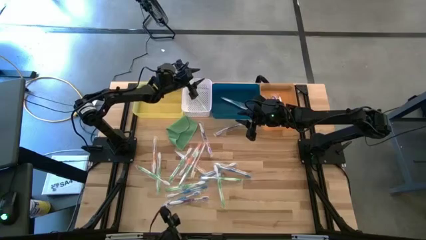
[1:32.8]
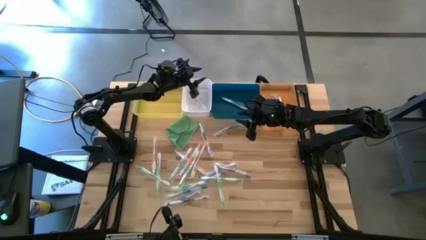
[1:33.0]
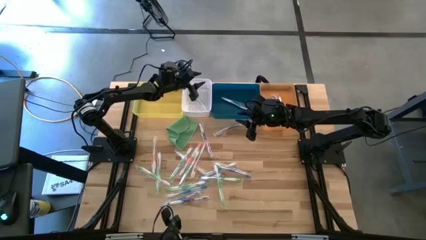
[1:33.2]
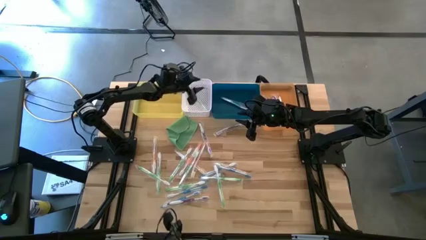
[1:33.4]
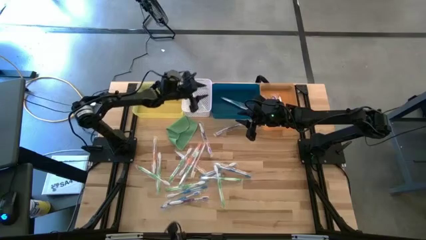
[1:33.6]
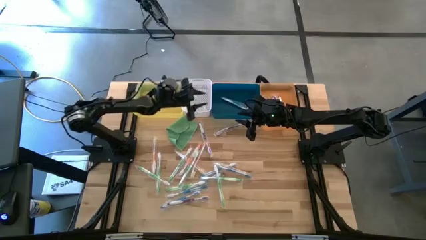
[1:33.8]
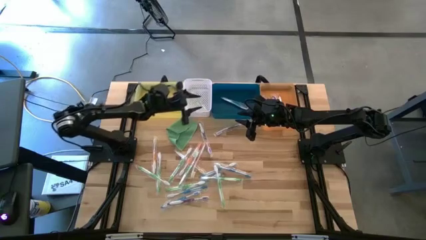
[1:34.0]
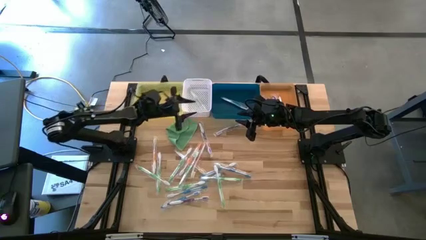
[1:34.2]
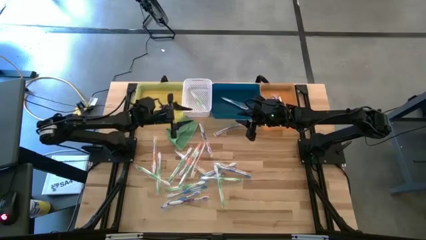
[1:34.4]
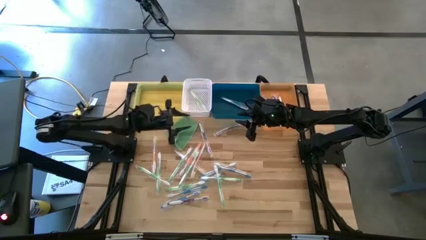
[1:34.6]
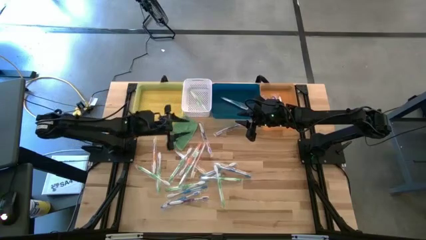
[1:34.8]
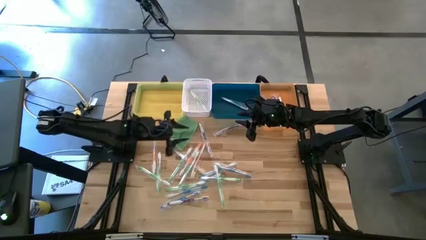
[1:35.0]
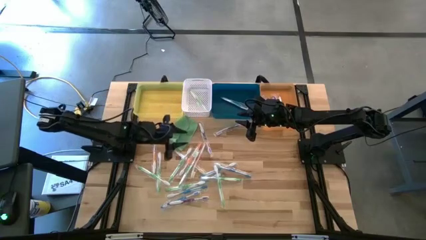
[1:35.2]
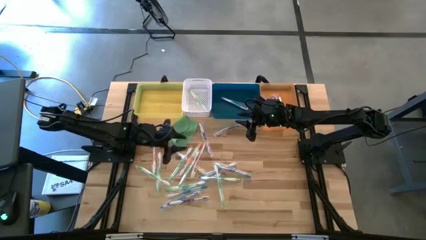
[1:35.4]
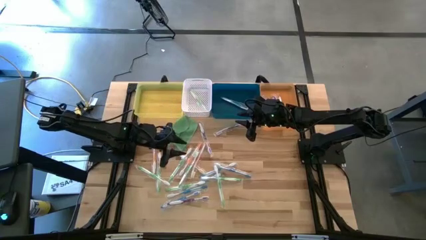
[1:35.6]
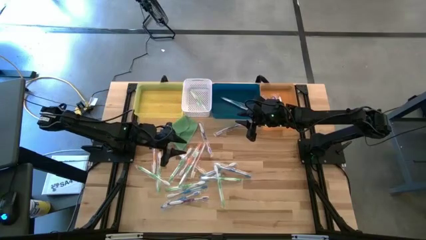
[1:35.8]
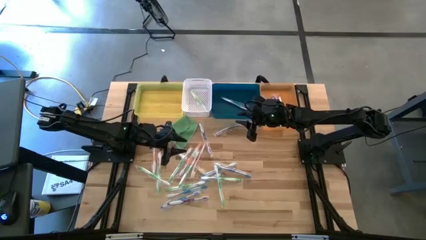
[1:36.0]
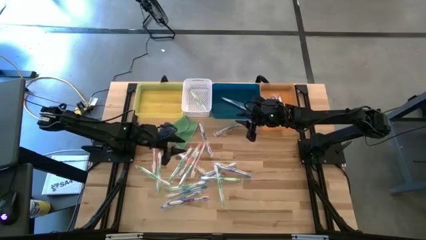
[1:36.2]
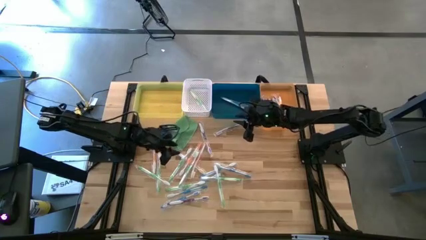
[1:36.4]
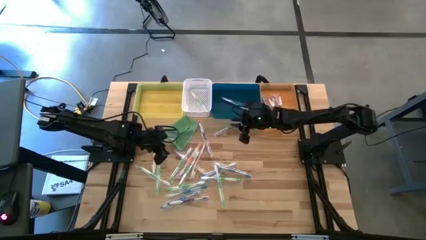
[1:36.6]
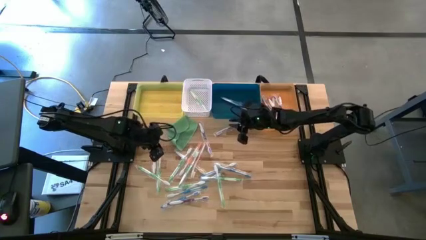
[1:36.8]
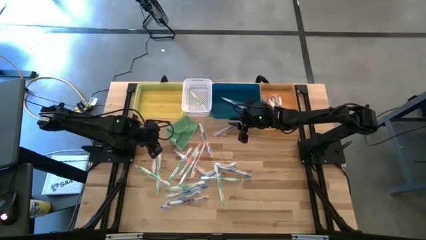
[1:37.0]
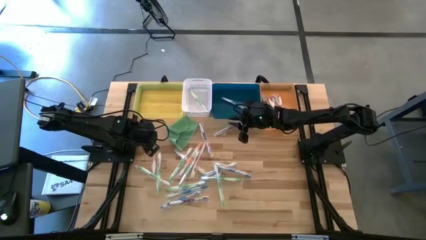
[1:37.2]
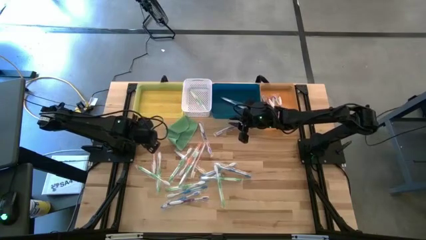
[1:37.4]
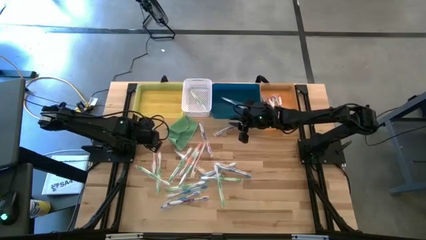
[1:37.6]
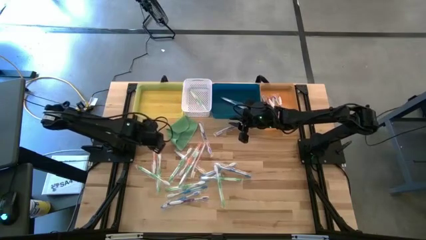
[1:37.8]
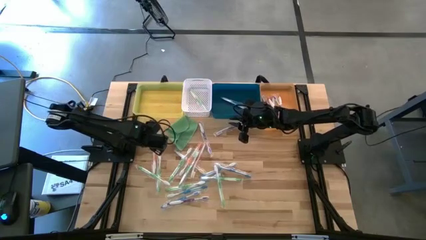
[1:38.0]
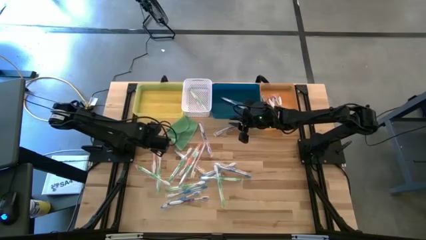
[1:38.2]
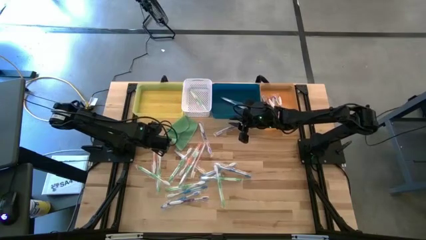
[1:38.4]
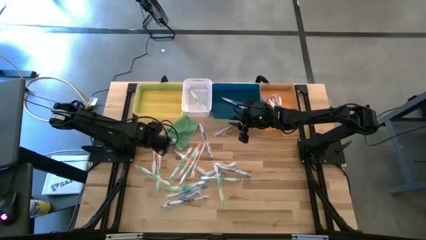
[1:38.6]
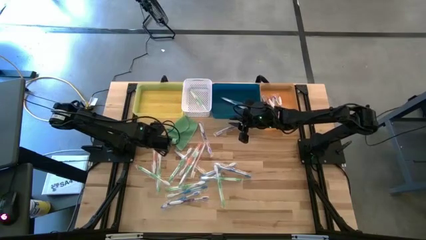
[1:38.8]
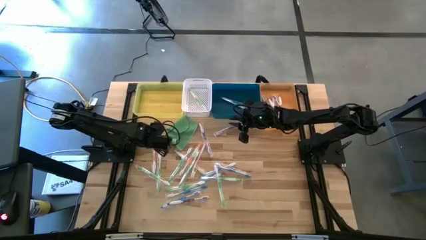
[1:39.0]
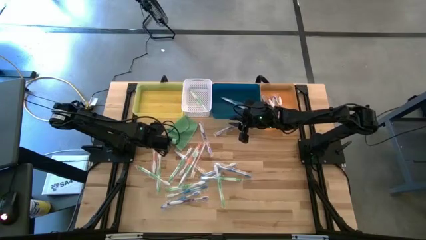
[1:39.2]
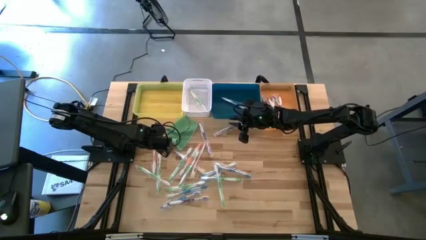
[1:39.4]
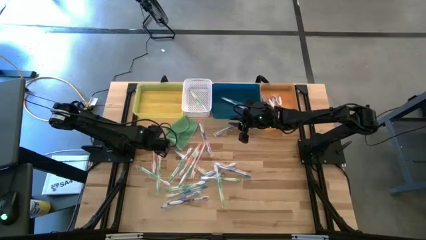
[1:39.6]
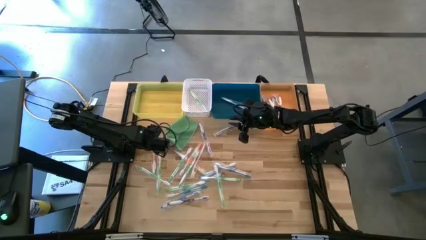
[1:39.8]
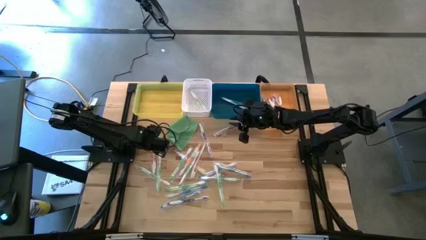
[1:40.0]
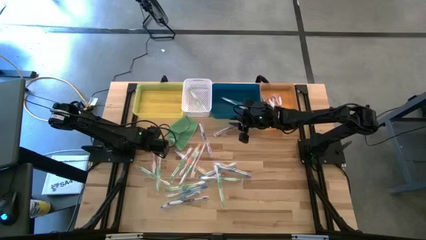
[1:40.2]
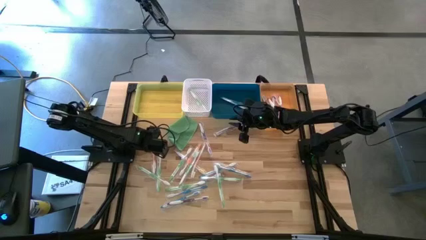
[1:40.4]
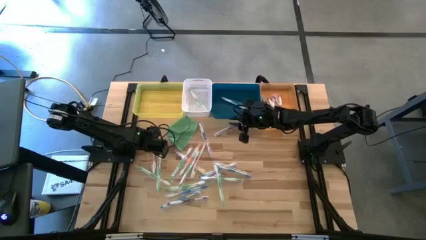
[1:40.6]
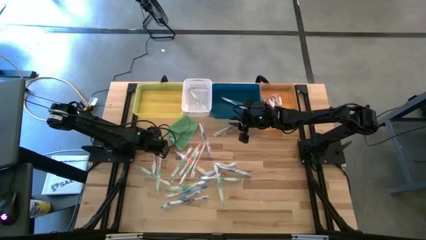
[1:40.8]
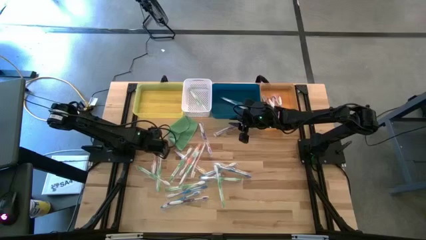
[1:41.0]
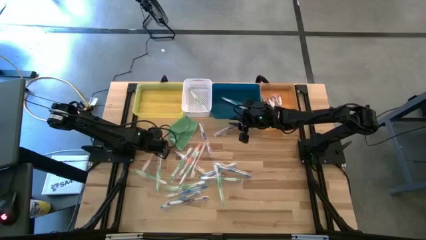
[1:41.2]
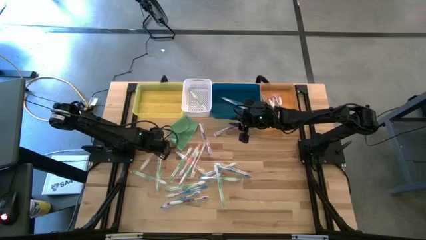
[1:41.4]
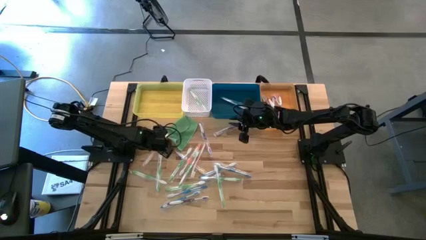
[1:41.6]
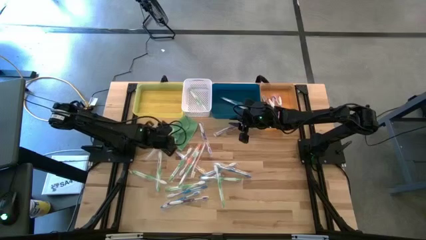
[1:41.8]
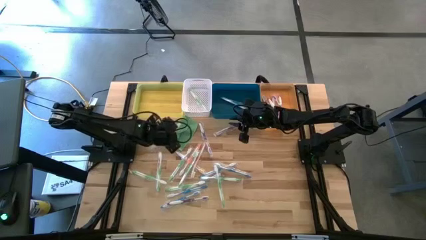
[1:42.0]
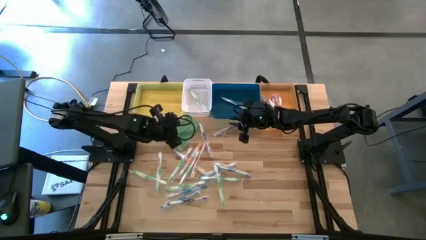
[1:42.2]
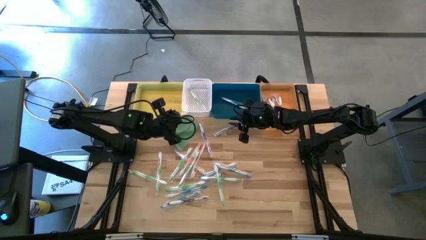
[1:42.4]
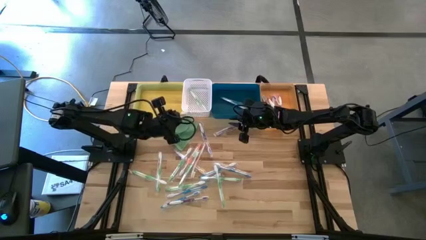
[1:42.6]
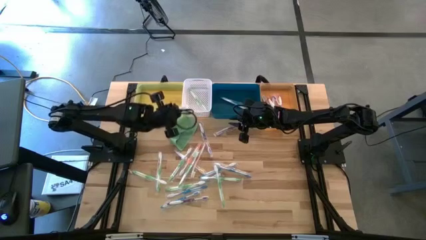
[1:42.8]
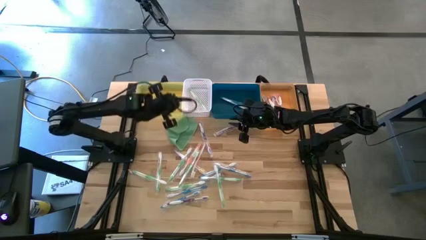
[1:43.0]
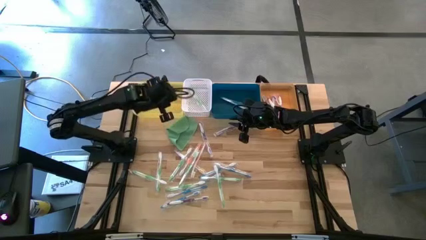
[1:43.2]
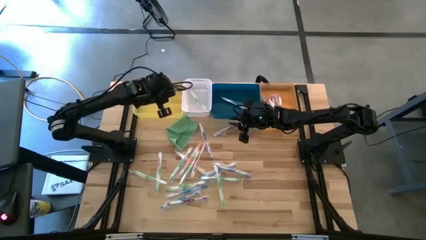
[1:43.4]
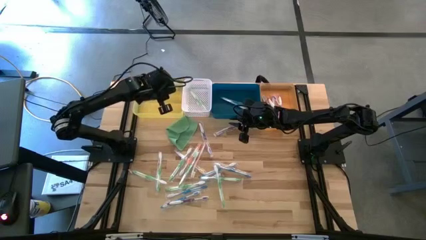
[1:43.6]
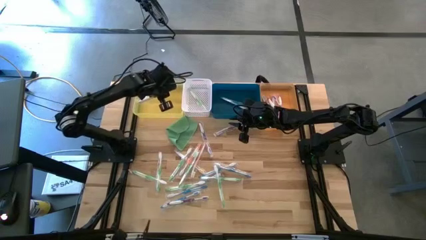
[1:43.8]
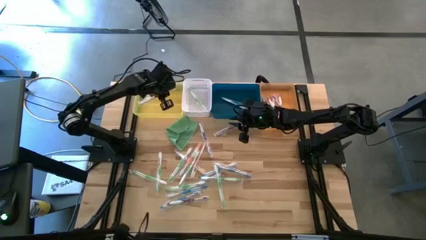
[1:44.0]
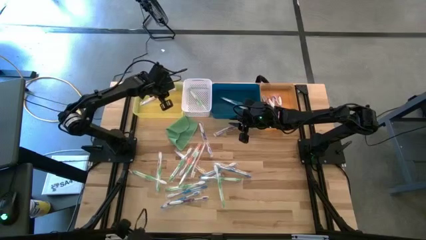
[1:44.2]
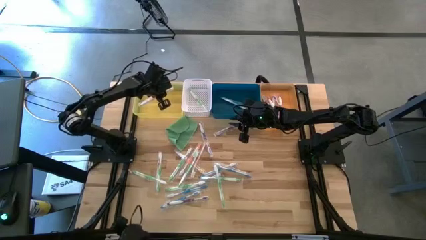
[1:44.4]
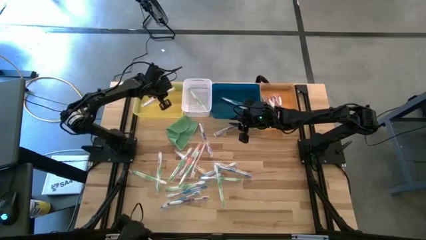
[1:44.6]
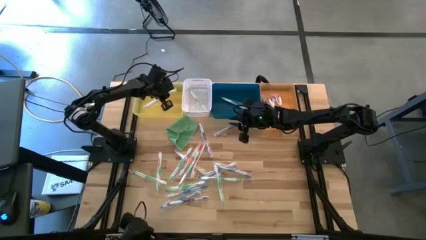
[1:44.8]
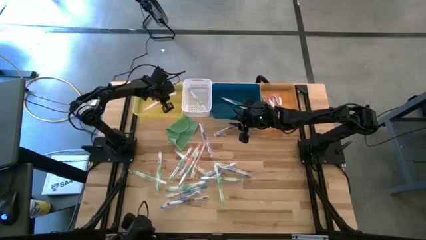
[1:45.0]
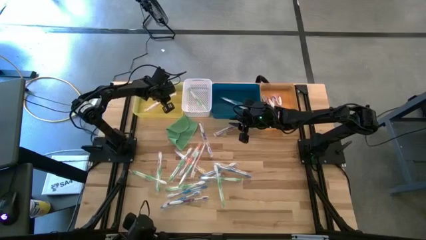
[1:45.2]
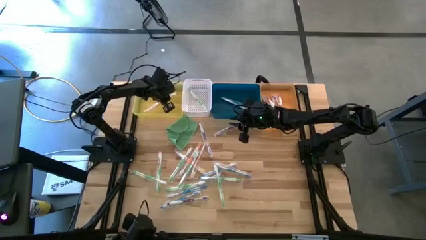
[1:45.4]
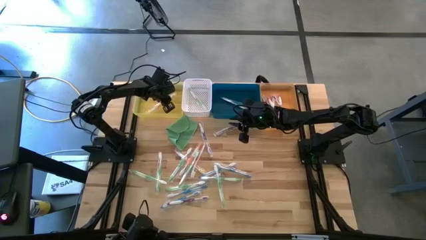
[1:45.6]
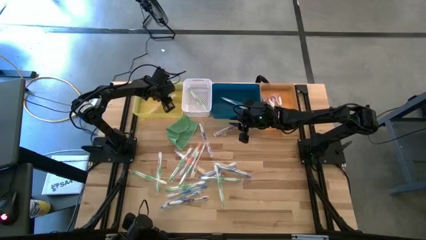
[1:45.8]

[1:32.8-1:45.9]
Task: Pick & Place Toothbrushes
Put the orange toothbrush into the yellow bin

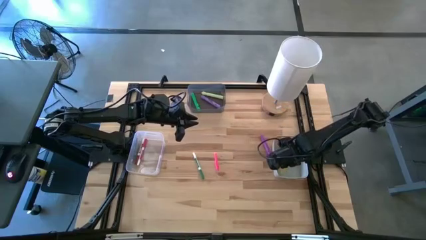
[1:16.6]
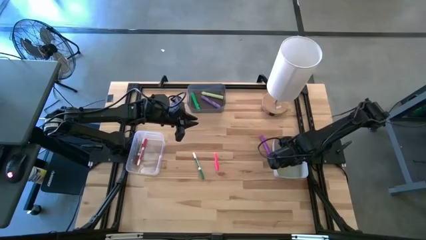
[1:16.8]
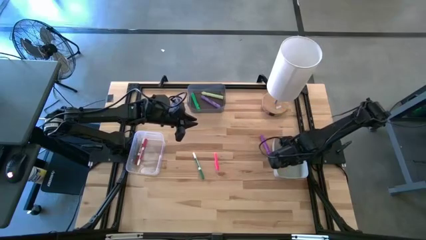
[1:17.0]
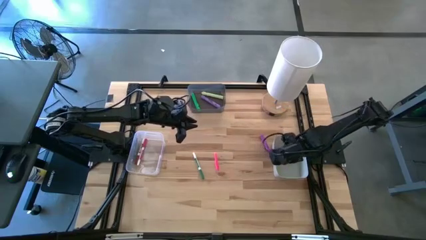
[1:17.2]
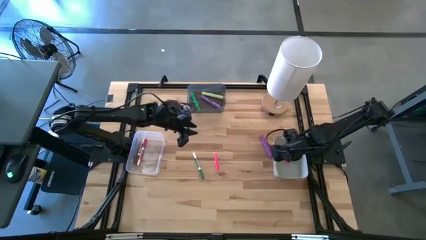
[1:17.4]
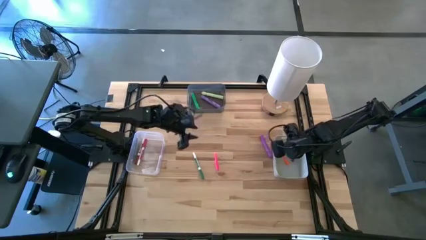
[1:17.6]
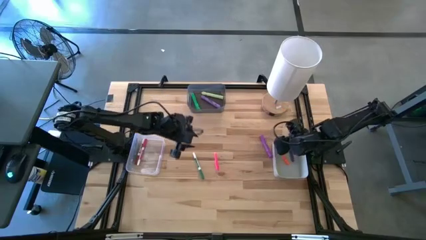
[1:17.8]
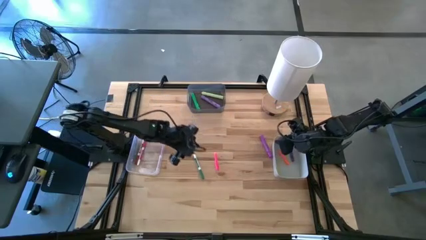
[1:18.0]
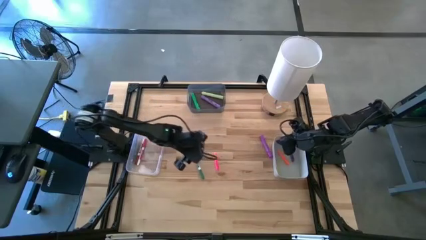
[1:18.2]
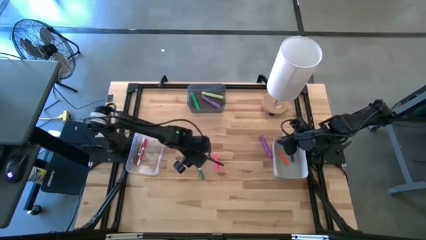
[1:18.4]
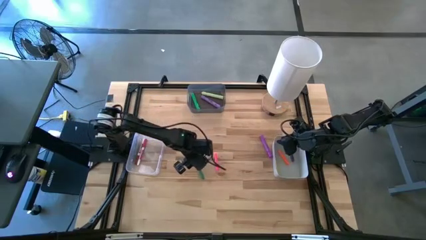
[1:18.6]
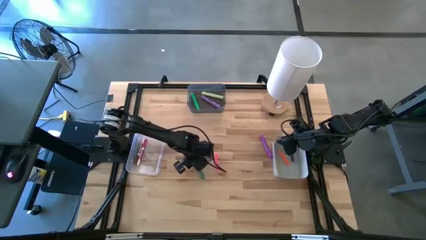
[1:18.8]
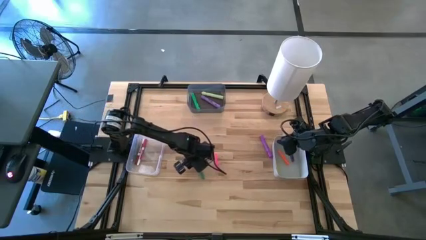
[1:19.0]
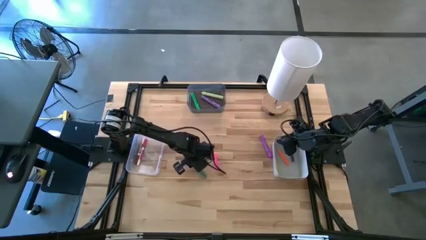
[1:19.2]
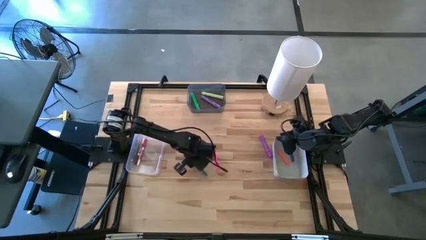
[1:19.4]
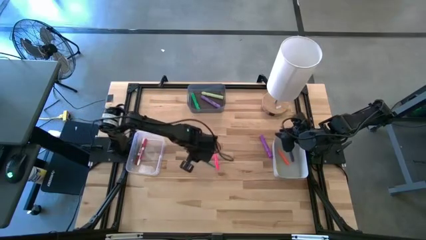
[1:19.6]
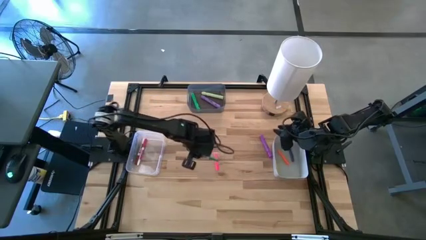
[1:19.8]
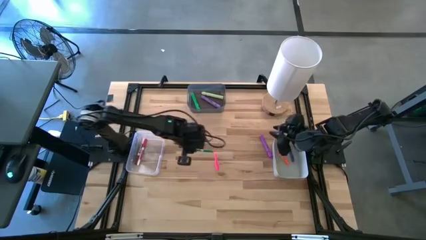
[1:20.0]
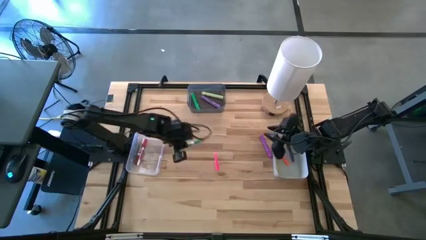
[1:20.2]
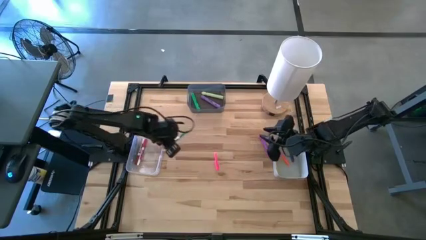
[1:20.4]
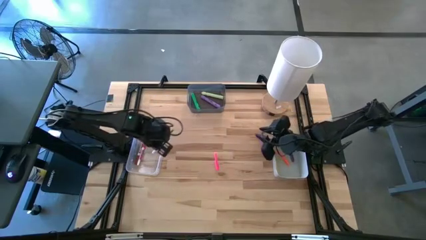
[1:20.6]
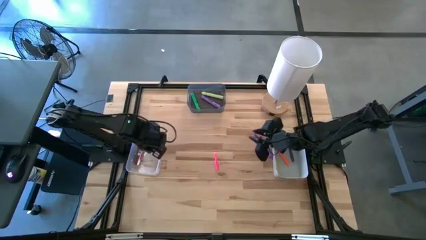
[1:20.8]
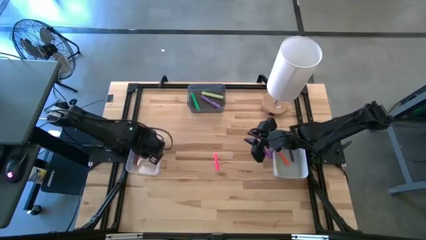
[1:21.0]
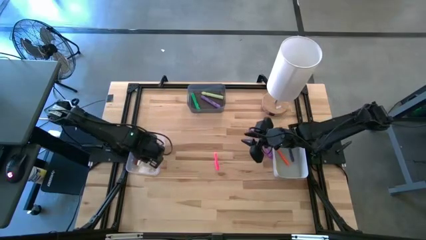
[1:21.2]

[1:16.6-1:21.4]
Task: Pick & Place Markers
Put the white and green marker into the transparent bin
